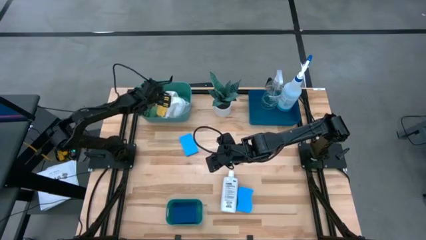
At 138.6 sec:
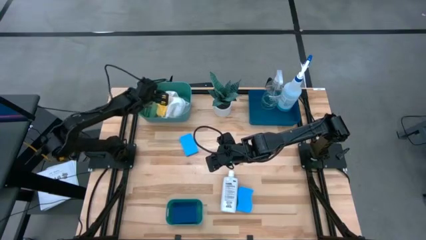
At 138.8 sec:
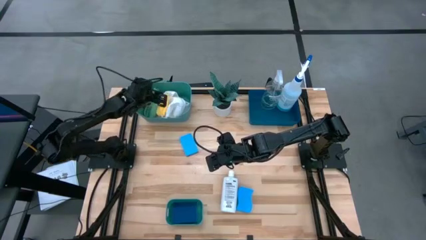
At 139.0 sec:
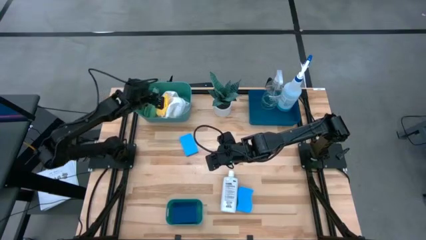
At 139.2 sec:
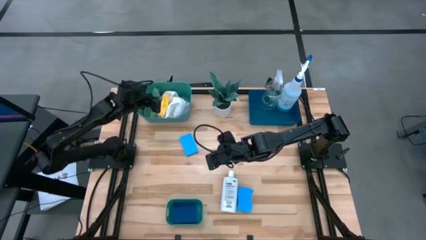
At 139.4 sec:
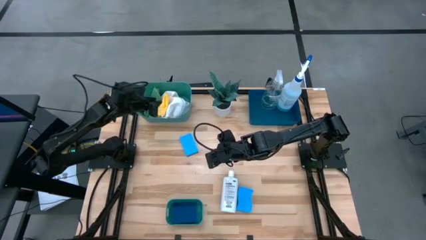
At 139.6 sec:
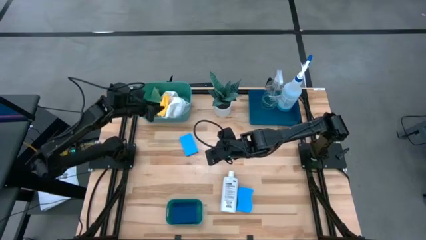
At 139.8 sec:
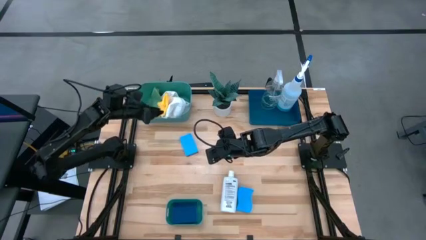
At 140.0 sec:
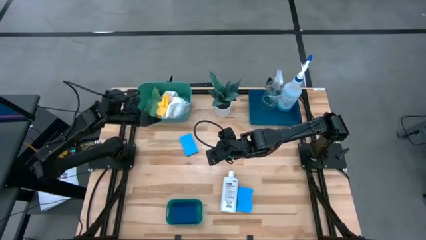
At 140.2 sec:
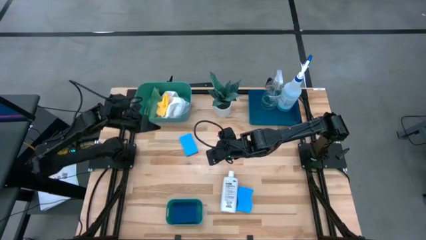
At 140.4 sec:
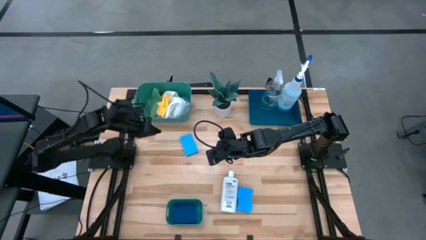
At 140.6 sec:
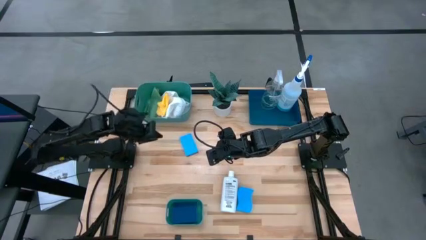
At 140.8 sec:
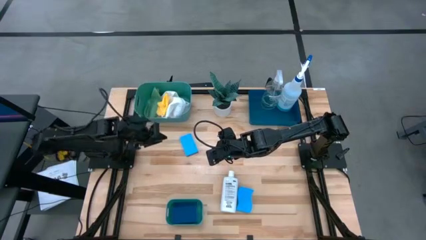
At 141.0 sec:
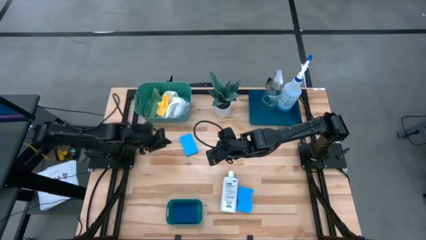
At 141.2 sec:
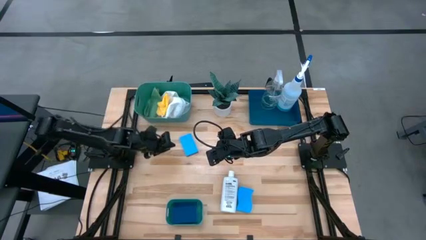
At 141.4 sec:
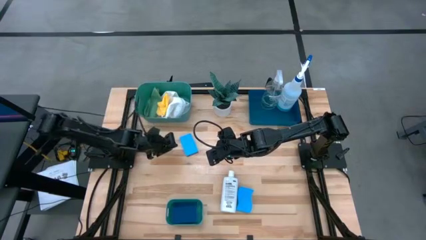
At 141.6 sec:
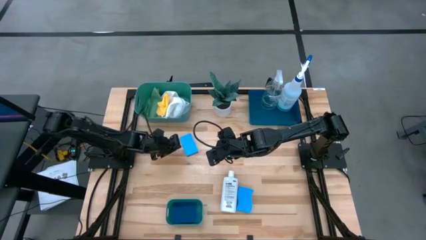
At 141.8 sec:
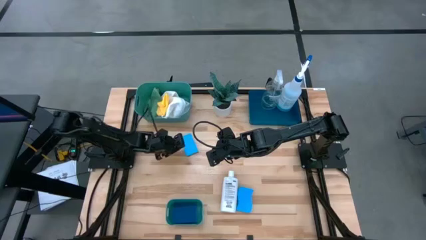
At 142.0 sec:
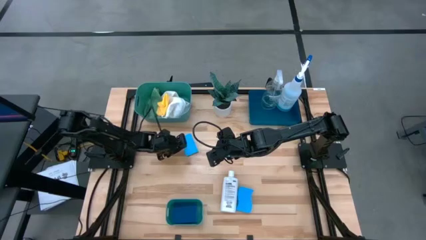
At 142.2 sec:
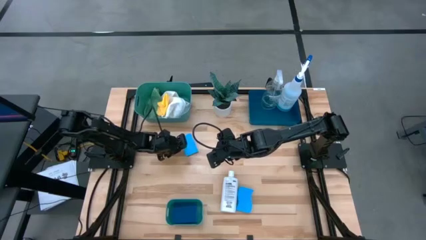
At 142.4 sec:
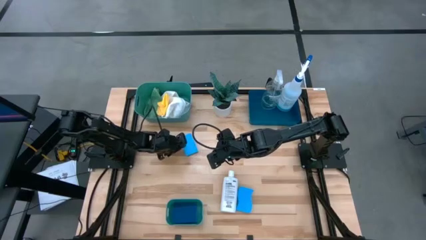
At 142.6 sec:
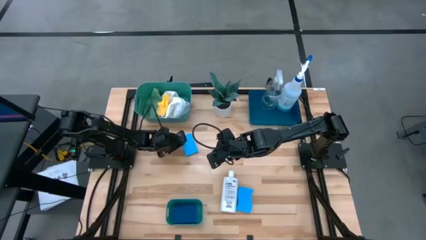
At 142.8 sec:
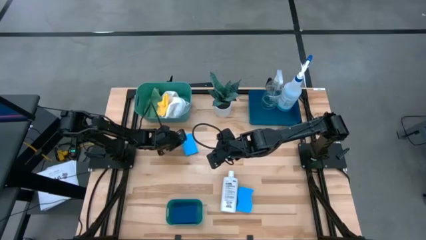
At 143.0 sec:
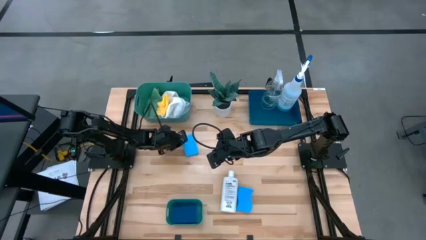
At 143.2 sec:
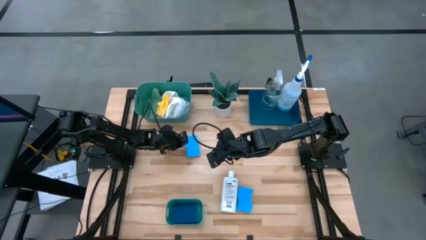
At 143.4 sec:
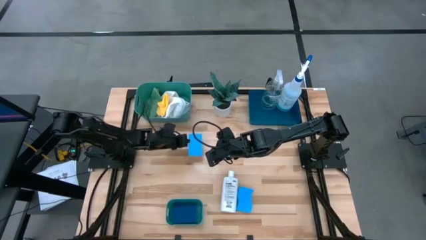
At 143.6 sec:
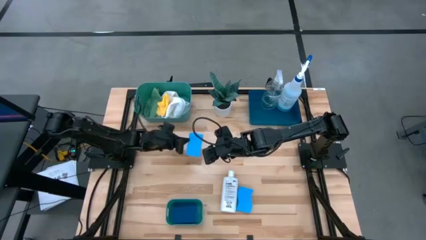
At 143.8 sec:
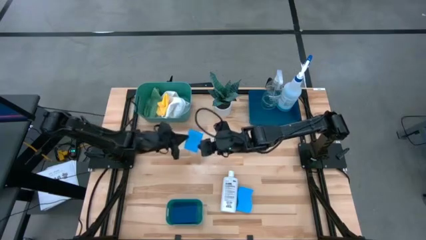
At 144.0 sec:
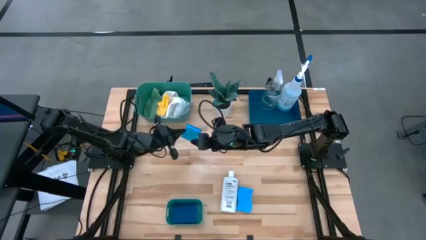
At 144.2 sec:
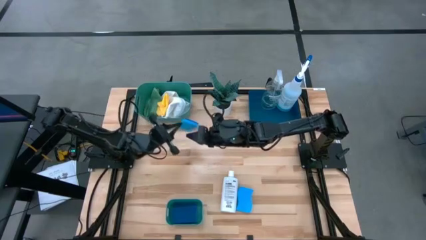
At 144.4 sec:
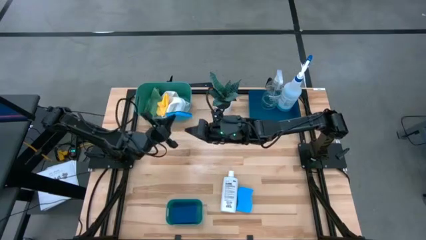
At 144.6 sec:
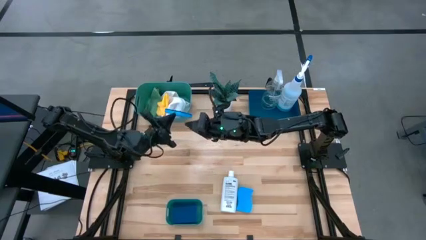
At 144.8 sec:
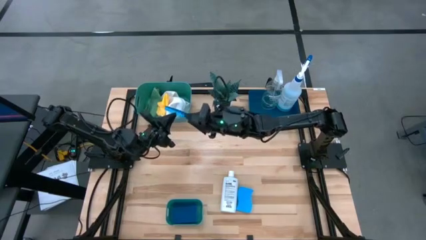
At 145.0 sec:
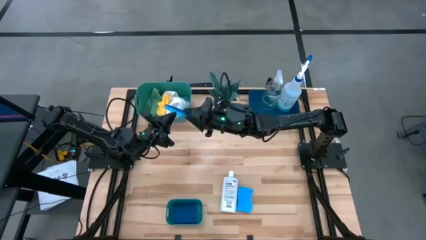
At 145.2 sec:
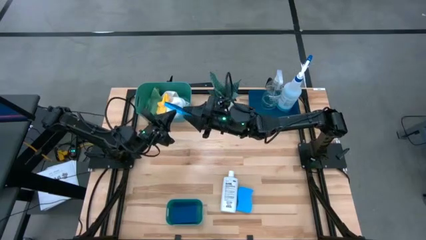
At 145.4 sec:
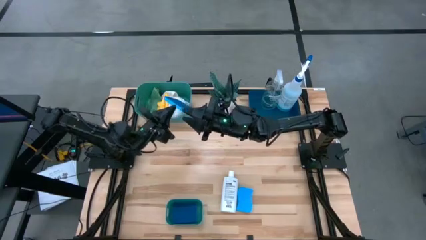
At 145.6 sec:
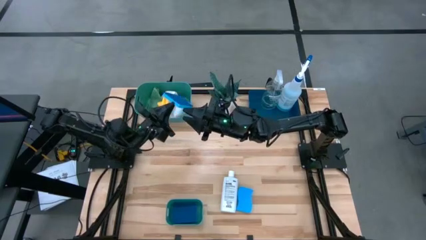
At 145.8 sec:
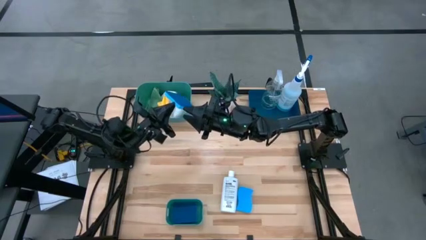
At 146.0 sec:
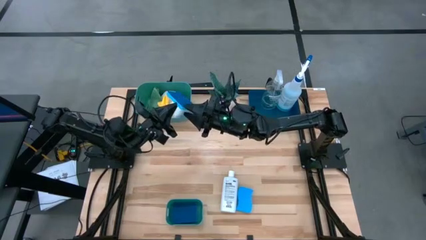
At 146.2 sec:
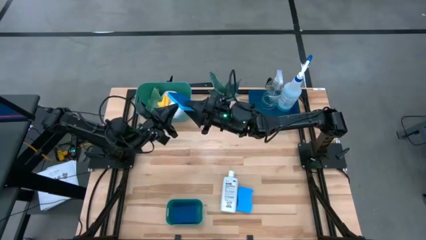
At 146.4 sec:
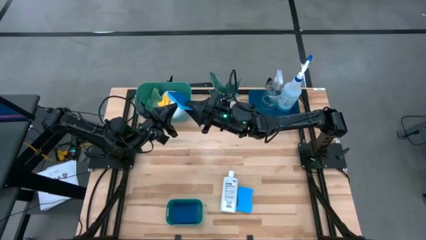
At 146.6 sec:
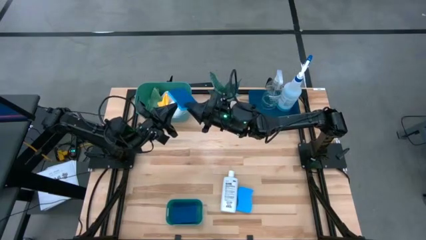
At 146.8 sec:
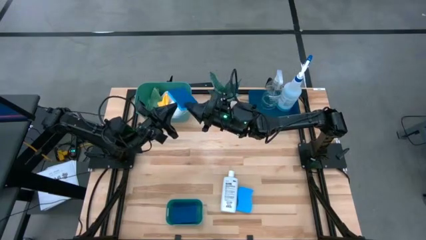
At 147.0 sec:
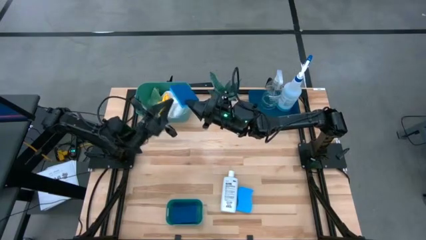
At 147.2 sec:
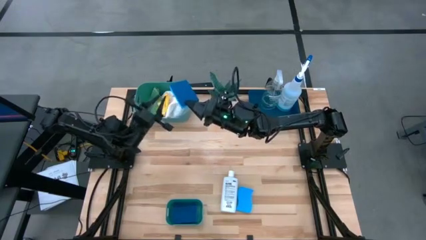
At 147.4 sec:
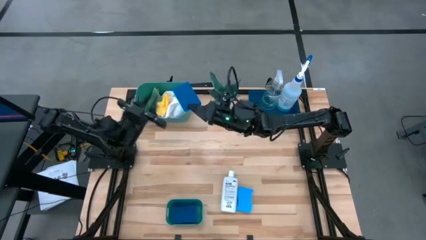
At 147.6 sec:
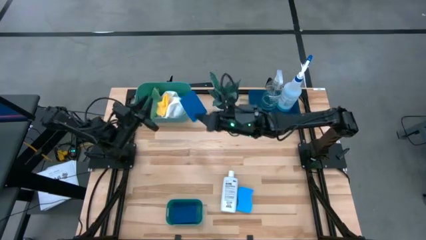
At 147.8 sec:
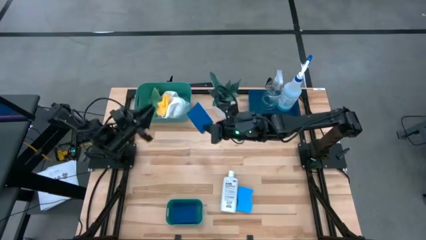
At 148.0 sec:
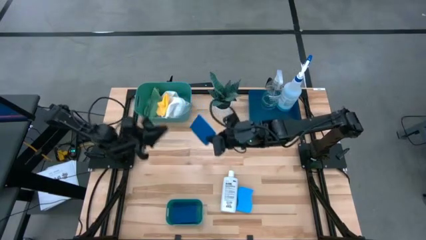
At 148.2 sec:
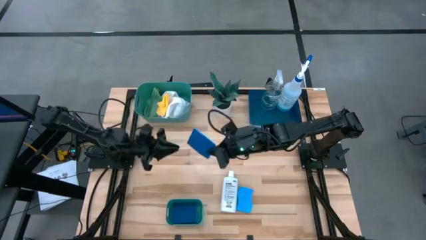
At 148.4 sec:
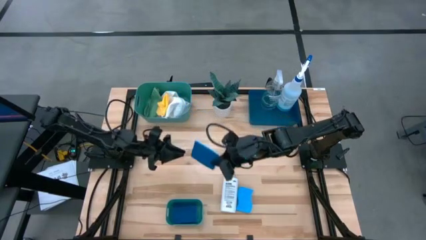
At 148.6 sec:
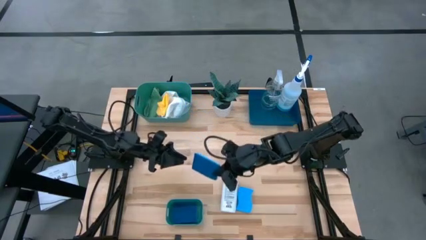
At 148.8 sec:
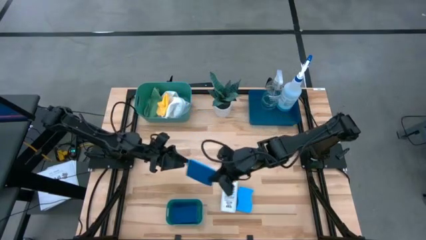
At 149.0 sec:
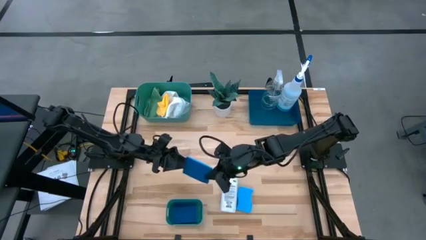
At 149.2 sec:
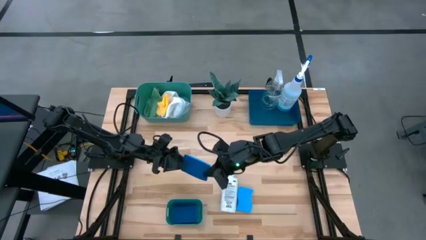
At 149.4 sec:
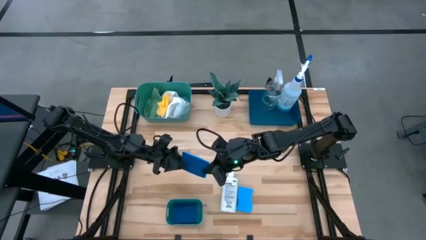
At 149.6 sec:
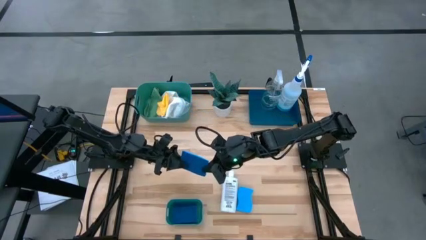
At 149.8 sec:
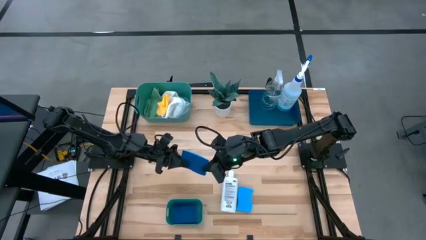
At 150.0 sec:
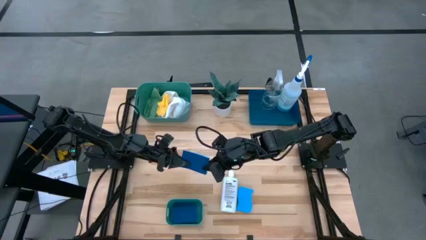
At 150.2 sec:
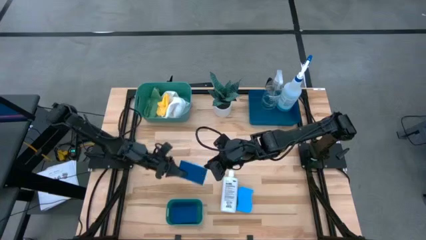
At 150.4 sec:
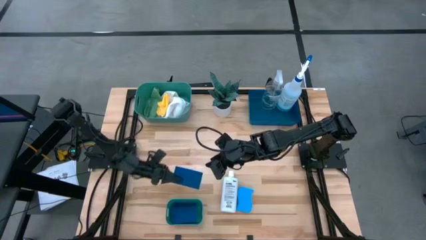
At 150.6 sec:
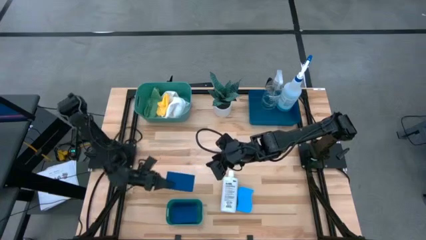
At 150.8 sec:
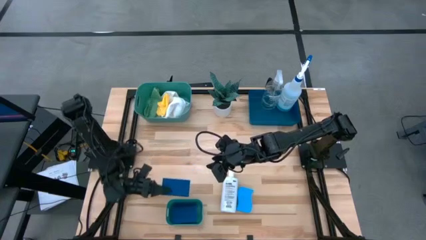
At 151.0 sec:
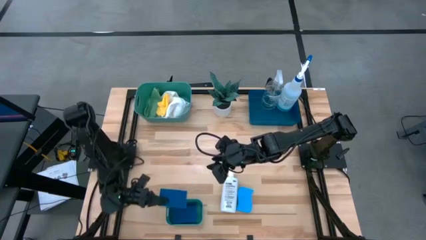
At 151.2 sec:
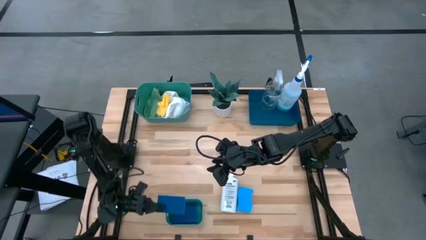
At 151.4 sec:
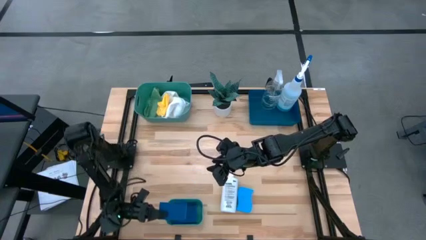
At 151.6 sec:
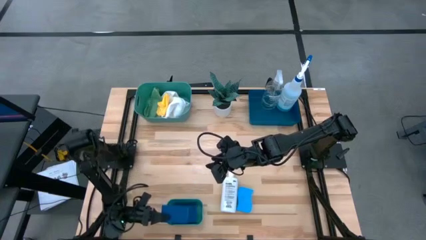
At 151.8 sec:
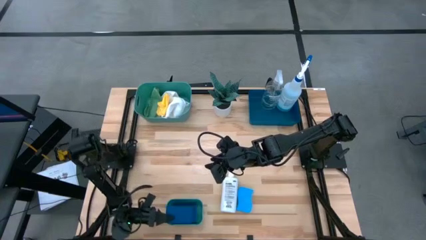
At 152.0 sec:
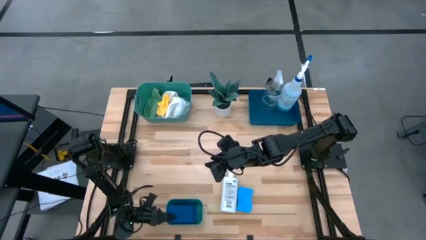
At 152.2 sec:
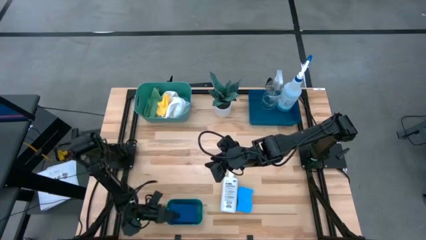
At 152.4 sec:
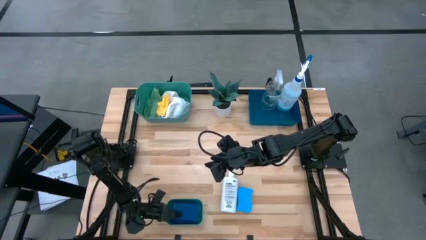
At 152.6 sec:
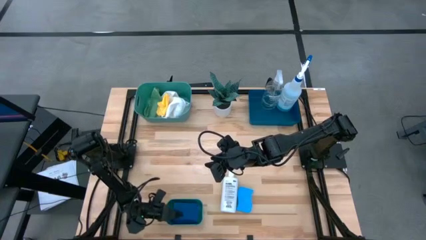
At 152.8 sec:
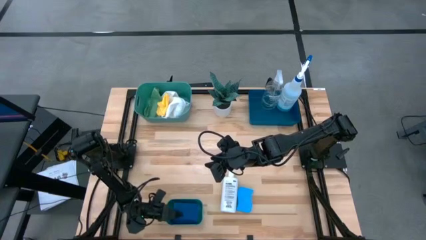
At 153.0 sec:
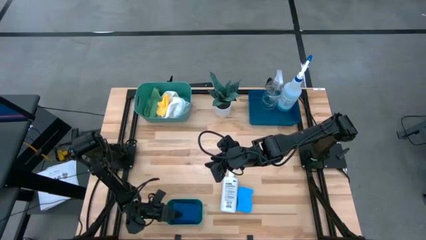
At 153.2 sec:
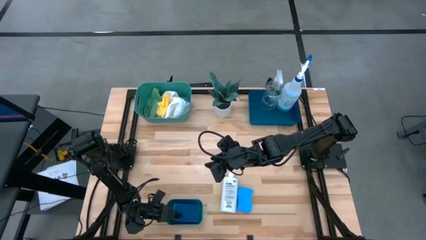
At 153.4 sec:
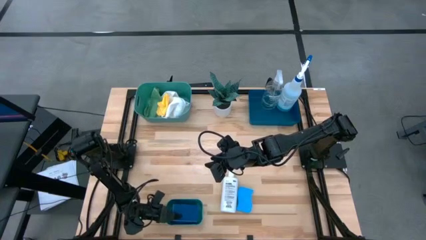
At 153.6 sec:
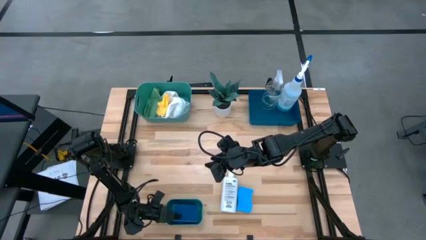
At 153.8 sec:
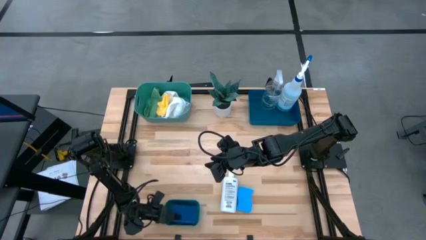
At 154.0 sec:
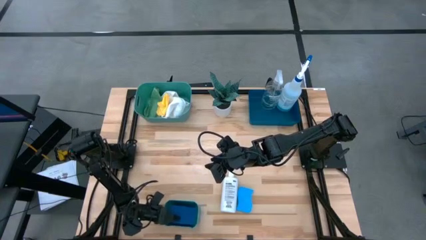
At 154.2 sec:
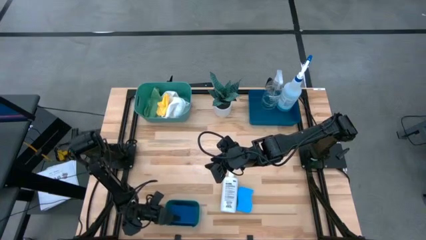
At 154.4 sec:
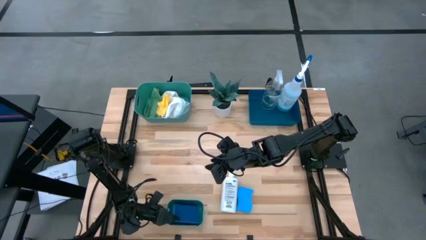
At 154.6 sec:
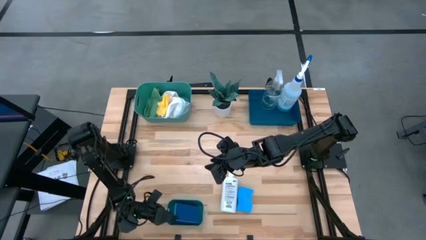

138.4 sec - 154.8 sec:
Task: Pick & Place Kitchen Items
Put the blue sponge into the bottom green bin
